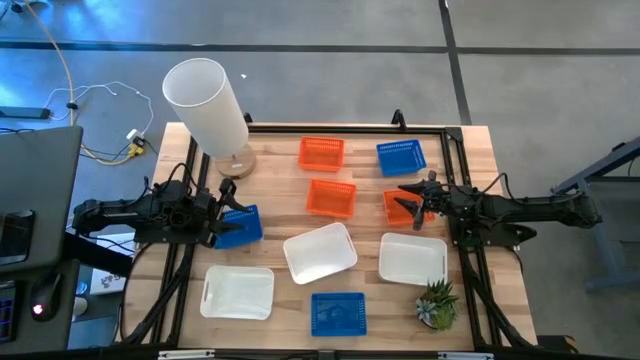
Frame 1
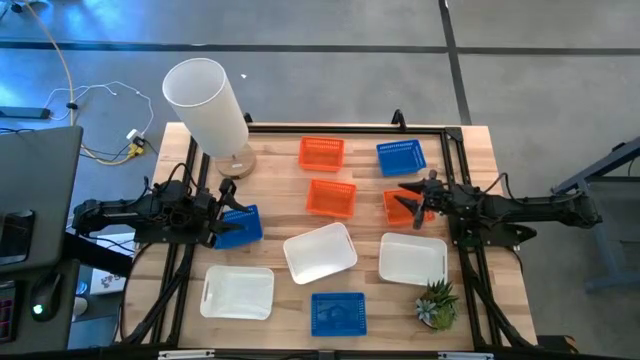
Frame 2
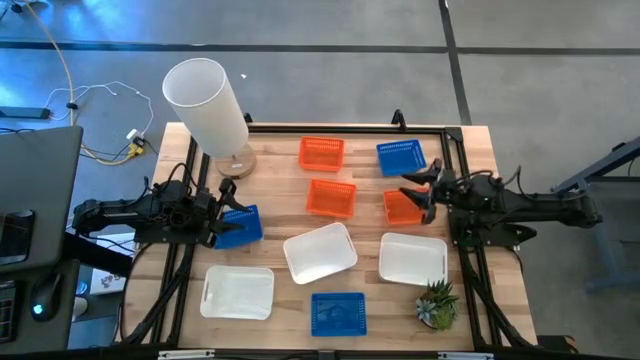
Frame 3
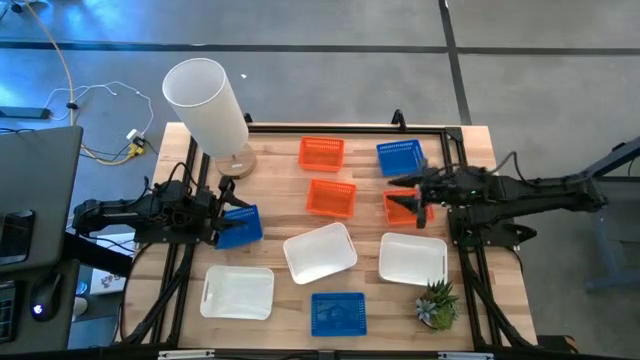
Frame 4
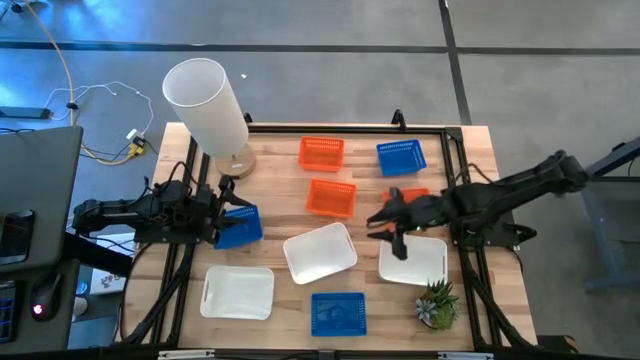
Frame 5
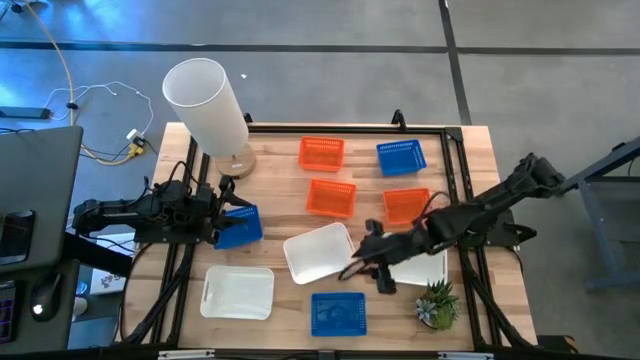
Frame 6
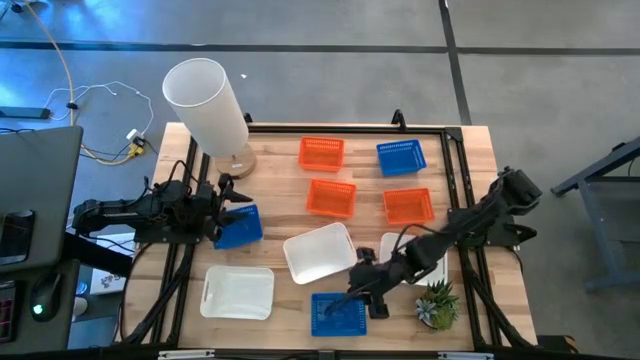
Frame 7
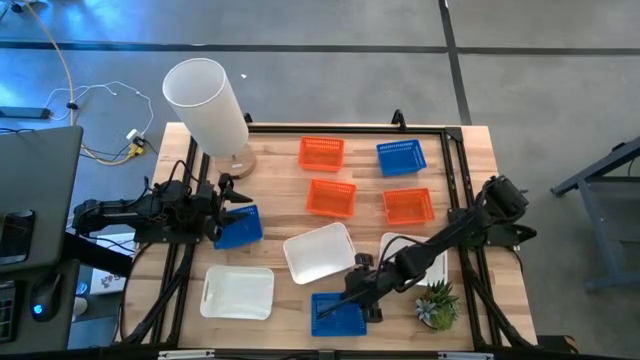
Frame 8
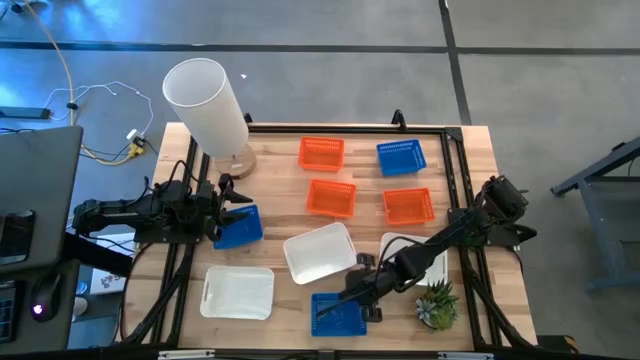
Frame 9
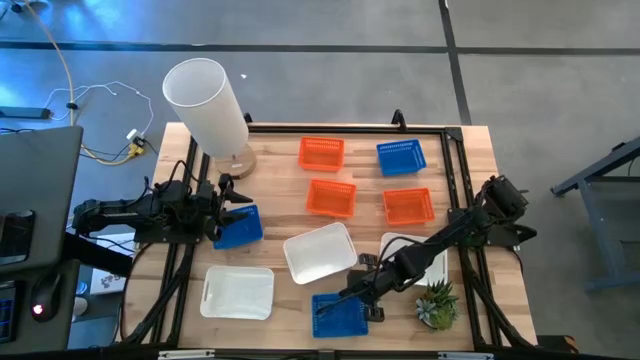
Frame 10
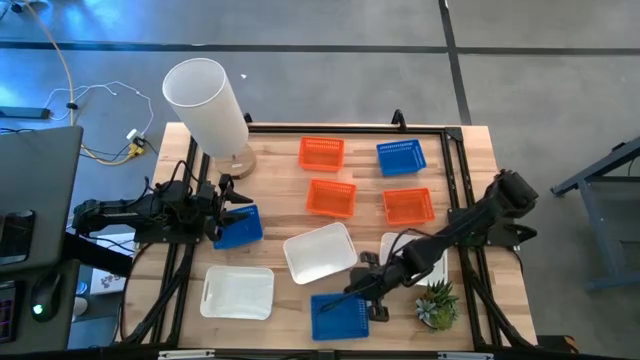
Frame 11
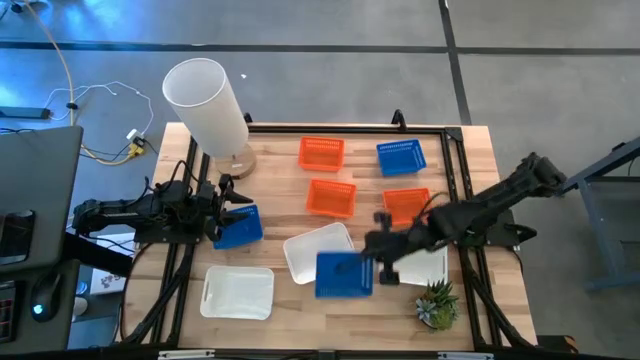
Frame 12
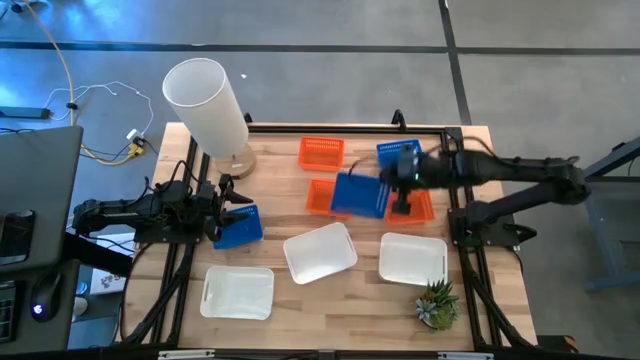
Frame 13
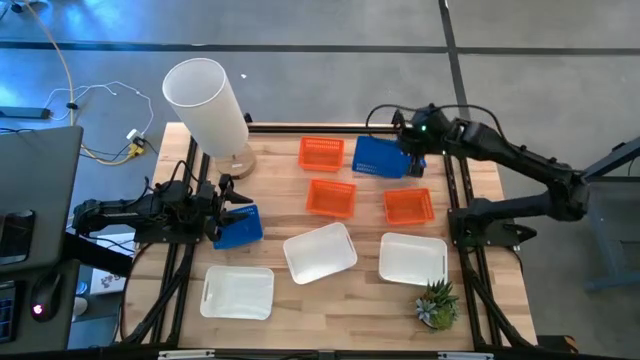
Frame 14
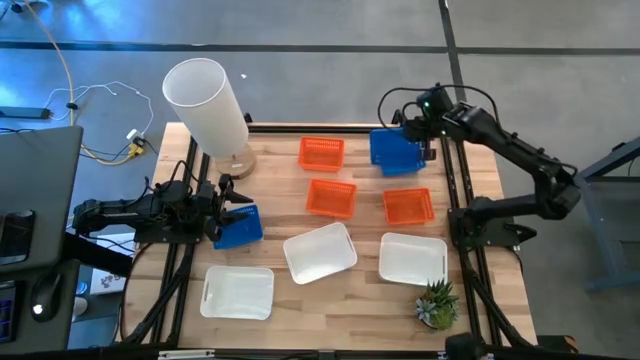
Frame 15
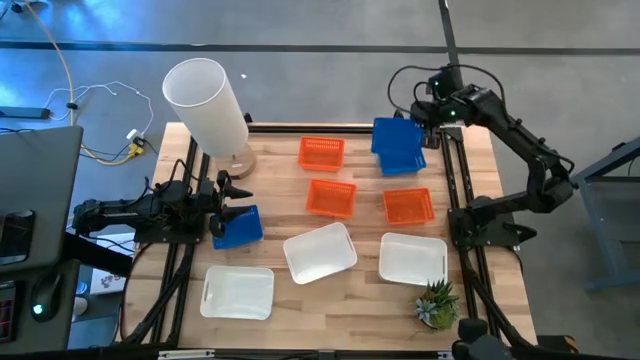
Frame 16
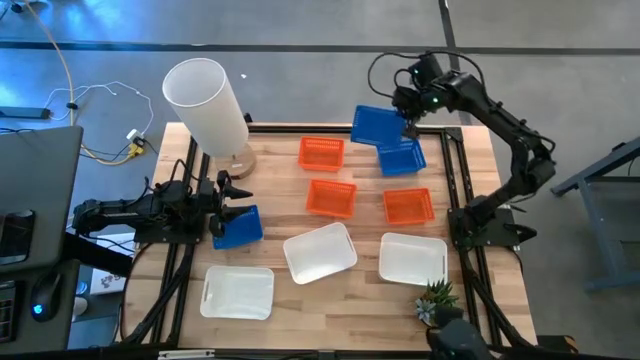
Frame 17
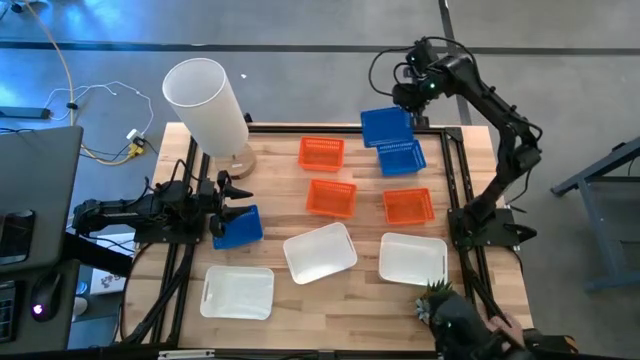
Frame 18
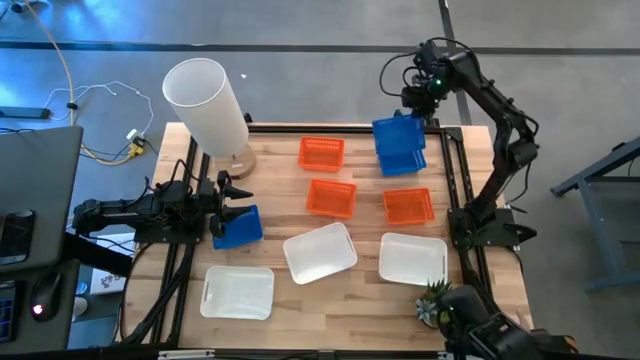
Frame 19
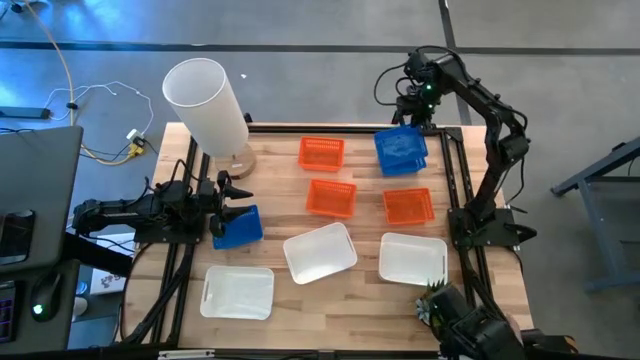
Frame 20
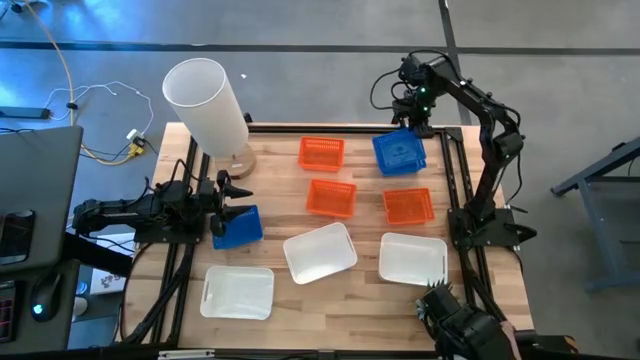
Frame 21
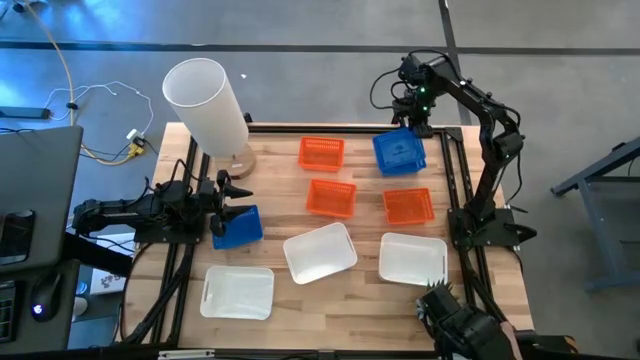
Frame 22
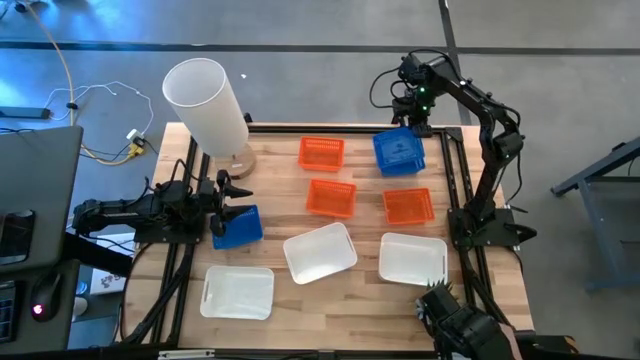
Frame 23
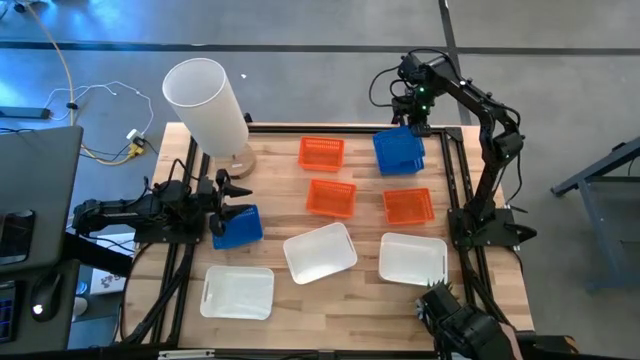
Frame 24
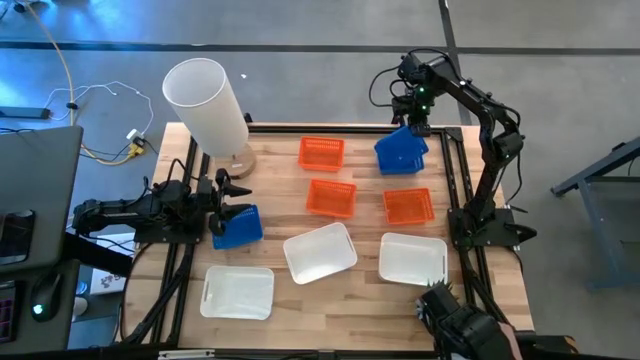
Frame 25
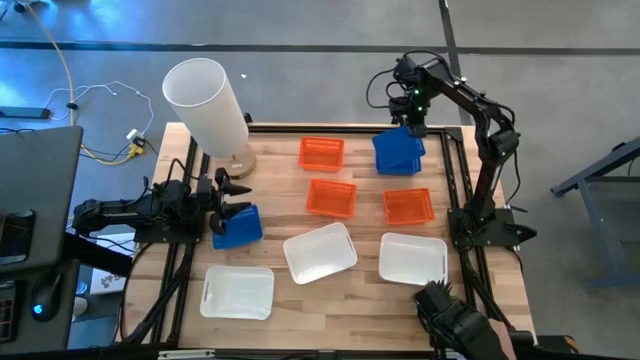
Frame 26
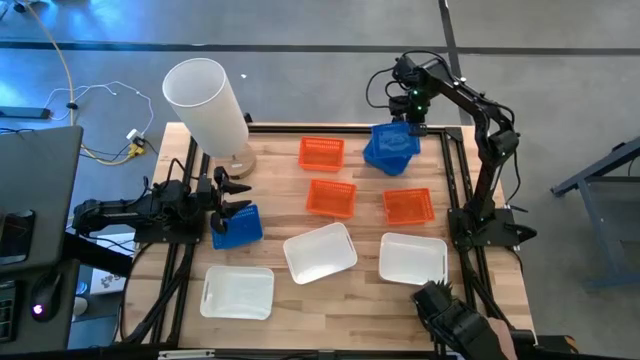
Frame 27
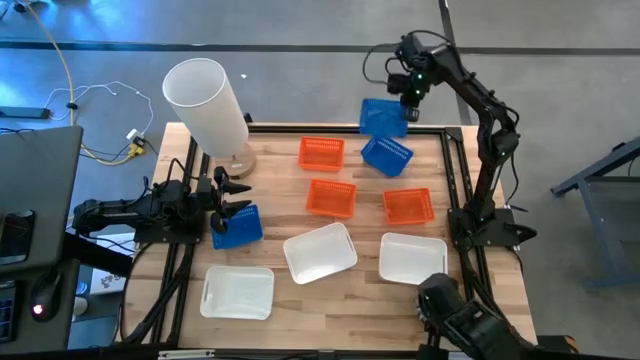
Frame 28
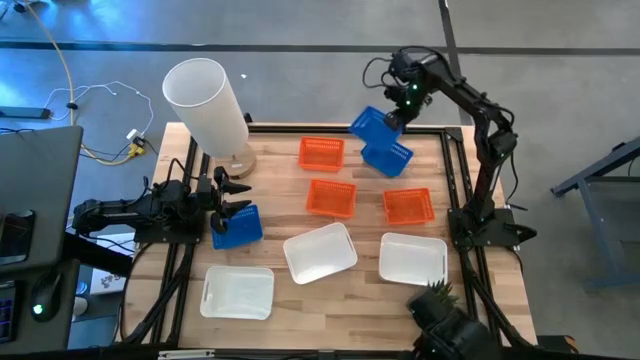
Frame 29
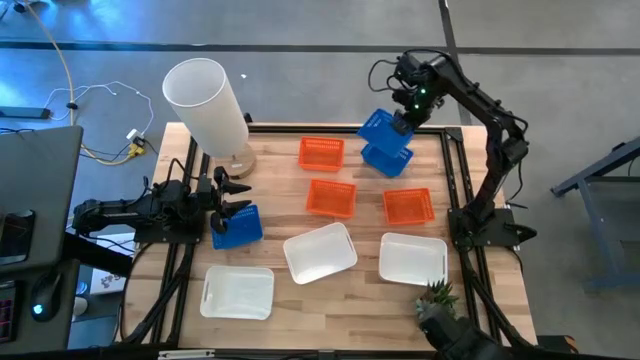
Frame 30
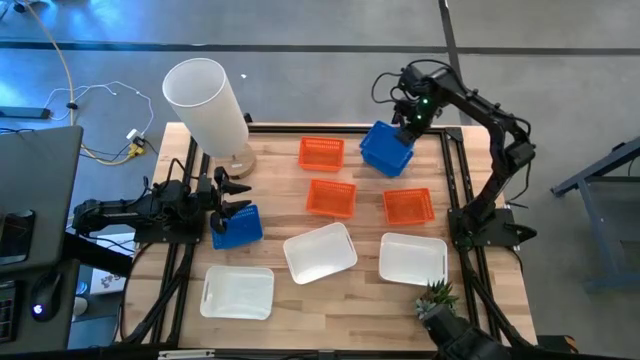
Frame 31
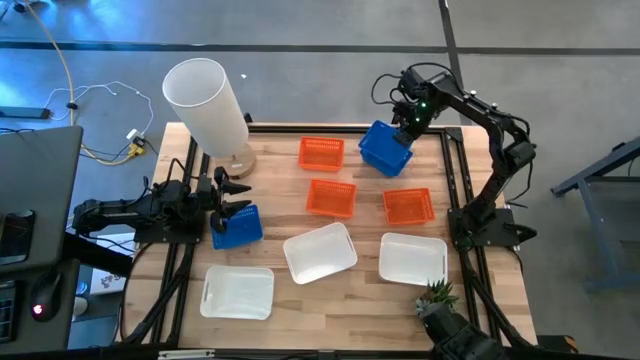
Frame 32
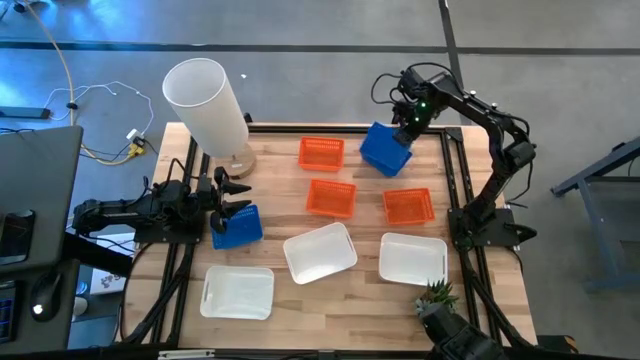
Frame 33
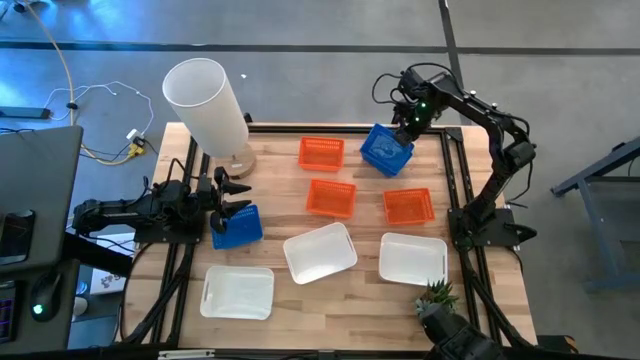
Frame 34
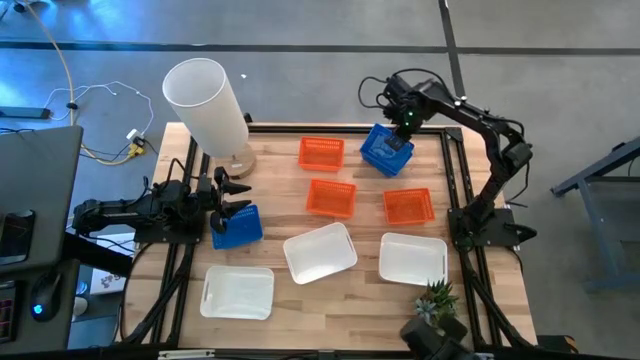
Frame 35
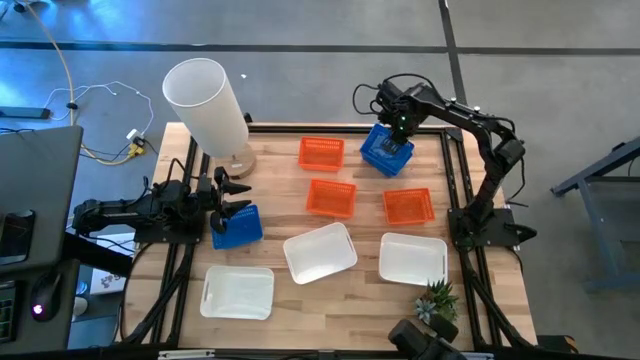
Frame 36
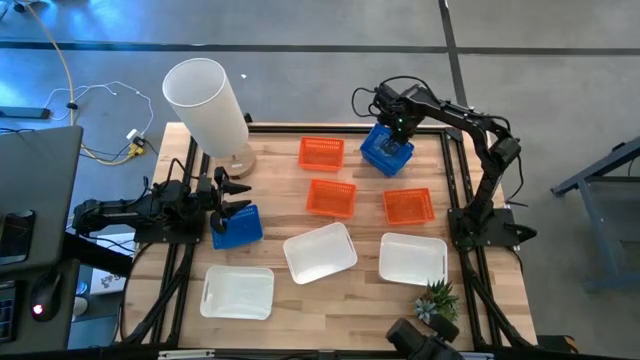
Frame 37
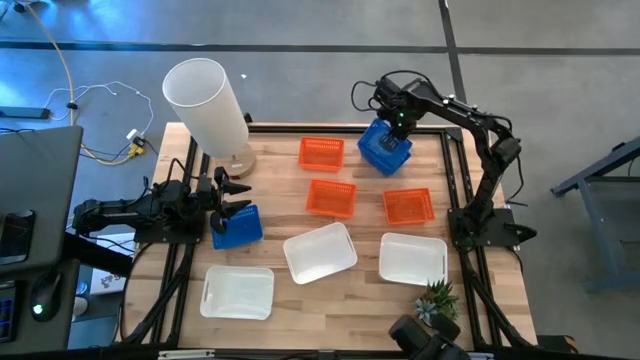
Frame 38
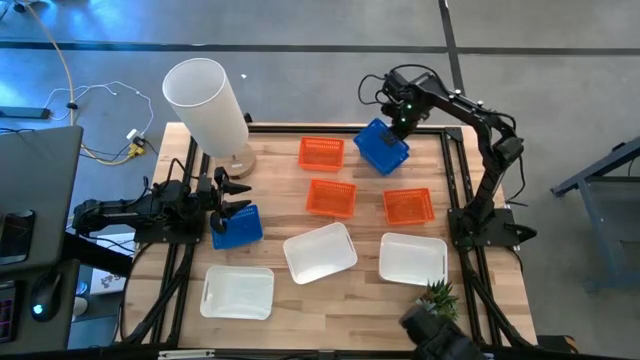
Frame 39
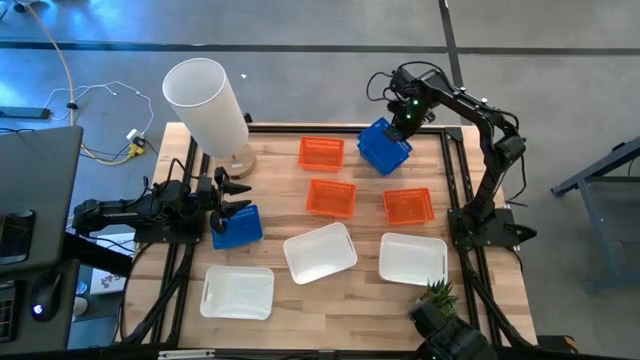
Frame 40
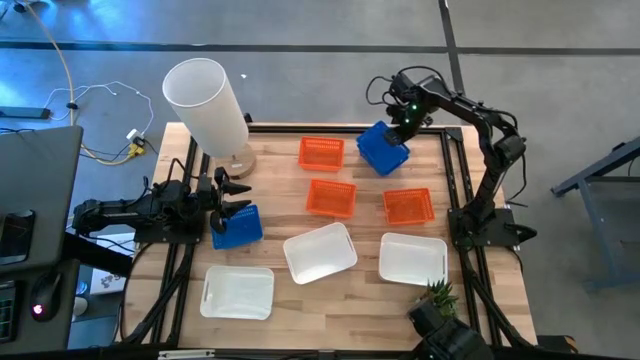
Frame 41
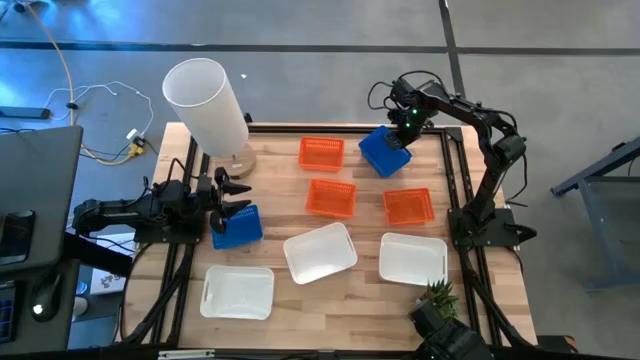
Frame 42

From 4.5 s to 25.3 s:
Stack the bottom blue bin on top of the other right blue bin
